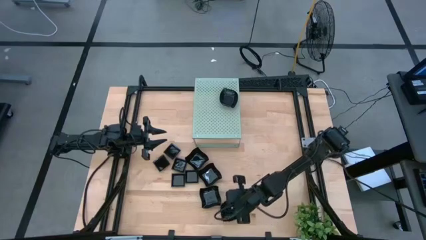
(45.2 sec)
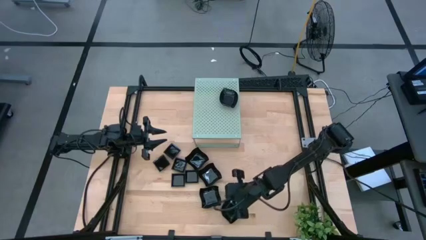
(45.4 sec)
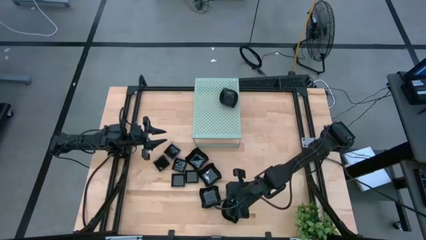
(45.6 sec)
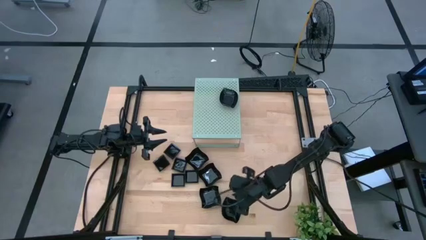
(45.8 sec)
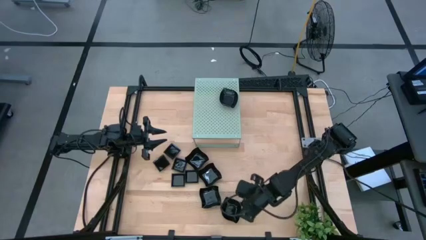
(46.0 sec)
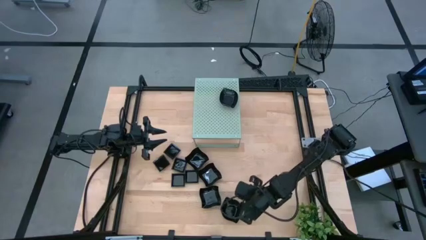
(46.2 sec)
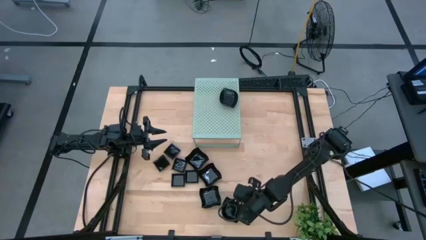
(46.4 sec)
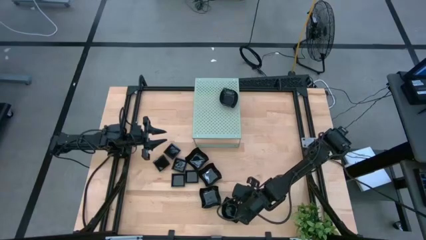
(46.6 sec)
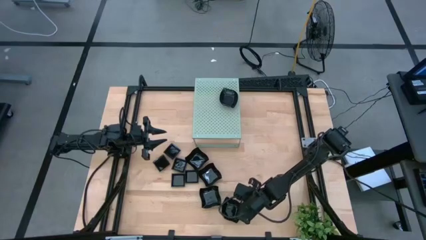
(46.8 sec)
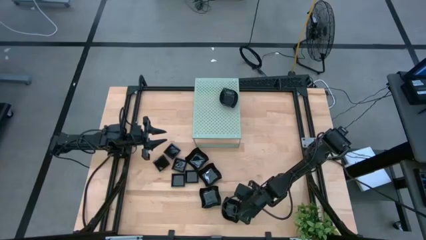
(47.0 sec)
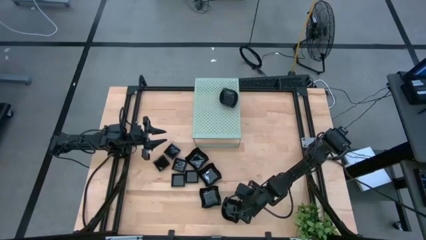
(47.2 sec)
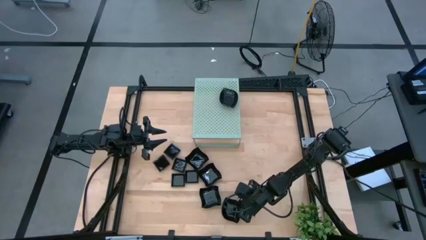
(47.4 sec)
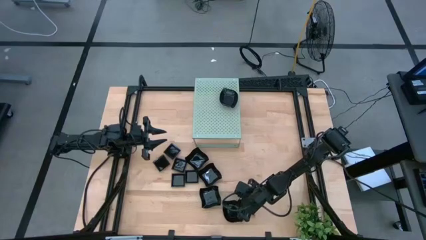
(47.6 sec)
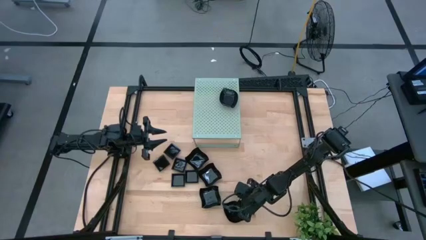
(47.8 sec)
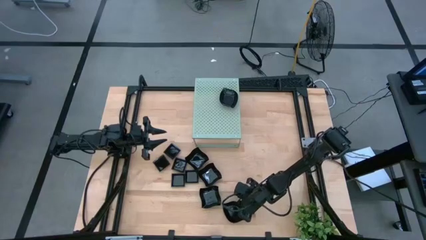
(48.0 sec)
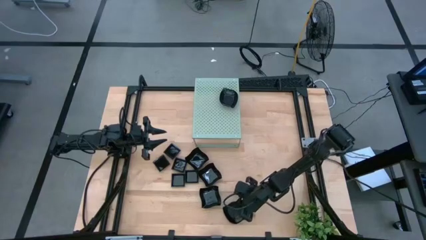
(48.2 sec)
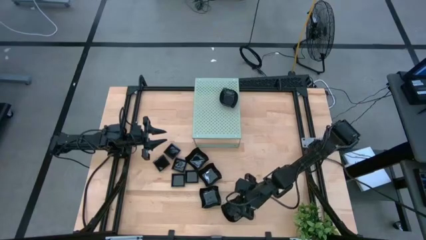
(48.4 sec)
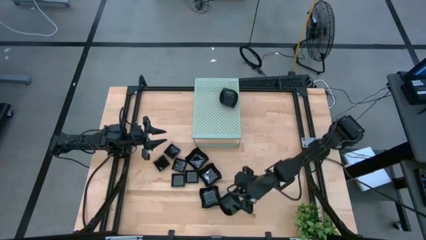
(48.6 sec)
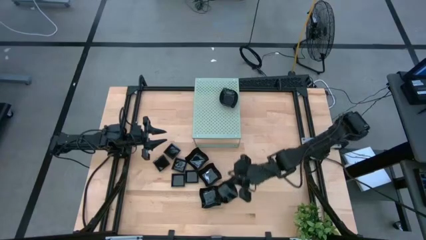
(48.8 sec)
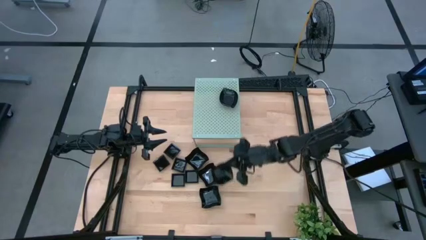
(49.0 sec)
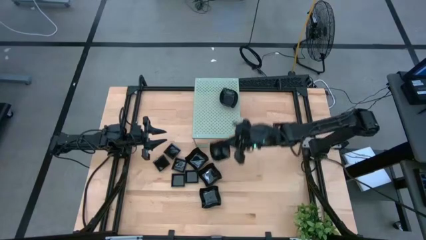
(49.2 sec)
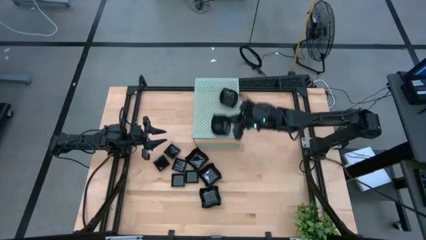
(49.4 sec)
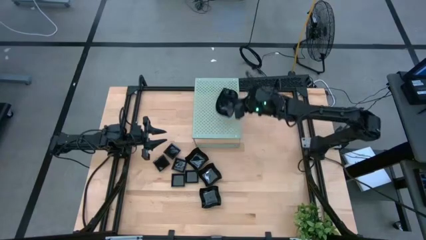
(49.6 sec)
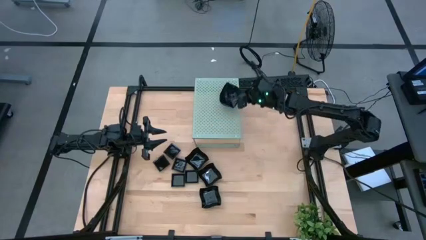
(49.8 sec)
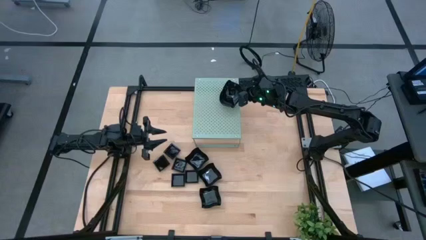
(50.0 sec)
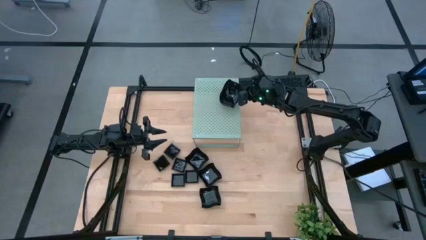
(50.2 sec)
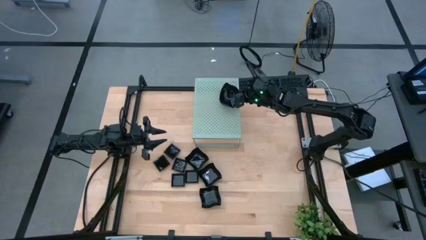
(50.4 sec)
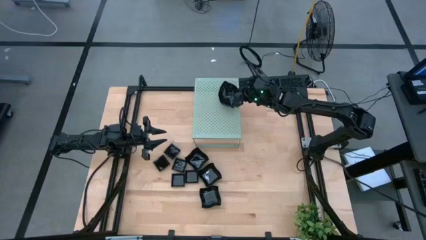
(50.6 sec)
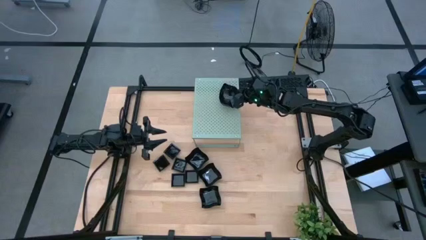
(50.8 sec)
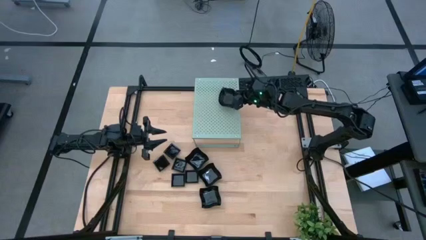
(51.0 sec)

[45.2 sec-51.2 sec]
Task: Pick & Place Mini shaped plates
Stack the black leaf-shaped plate on top of the other leaf-shaped plates on the shelf

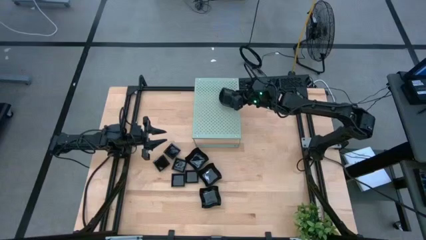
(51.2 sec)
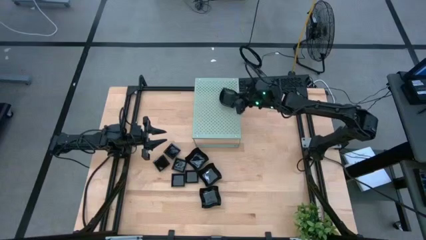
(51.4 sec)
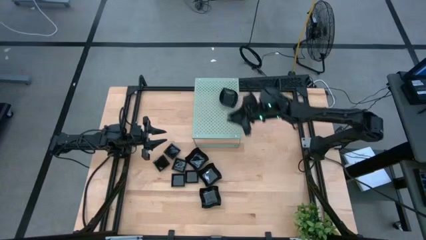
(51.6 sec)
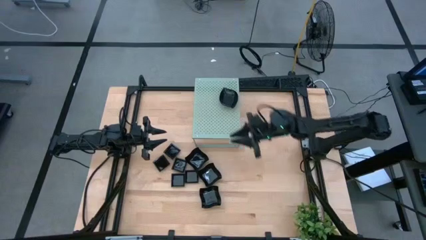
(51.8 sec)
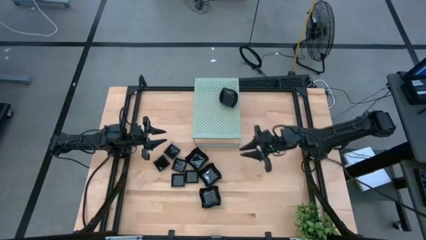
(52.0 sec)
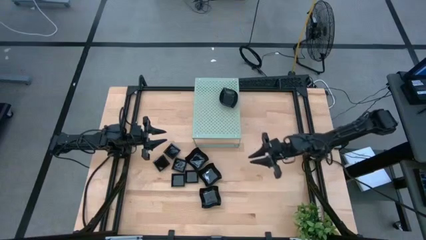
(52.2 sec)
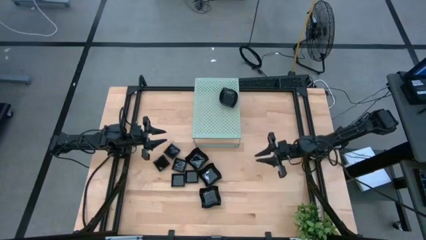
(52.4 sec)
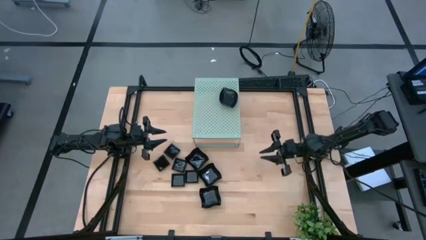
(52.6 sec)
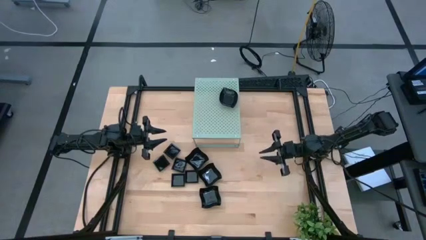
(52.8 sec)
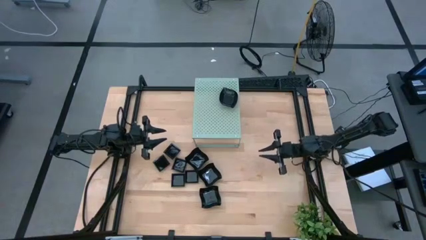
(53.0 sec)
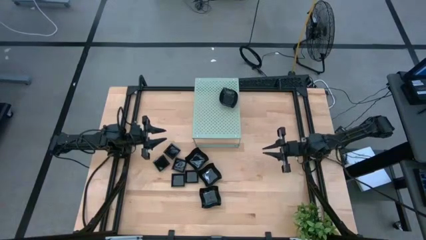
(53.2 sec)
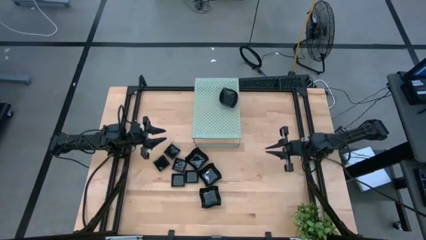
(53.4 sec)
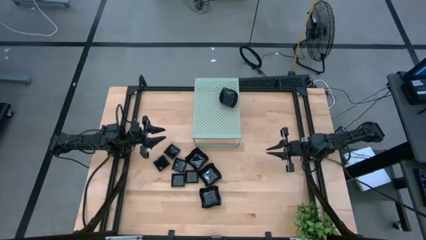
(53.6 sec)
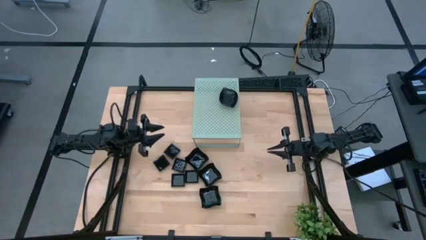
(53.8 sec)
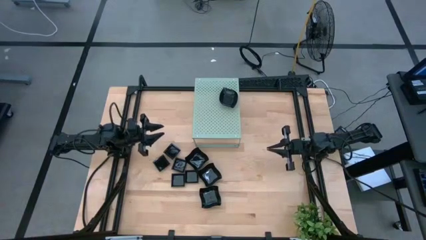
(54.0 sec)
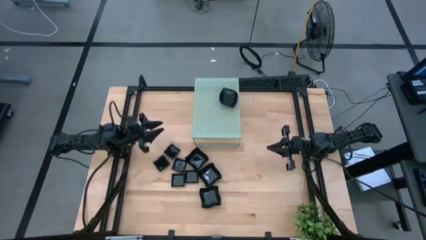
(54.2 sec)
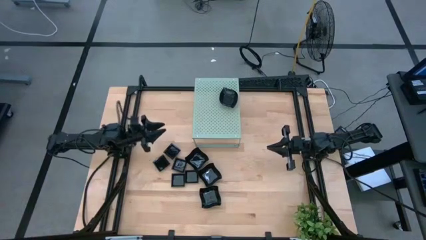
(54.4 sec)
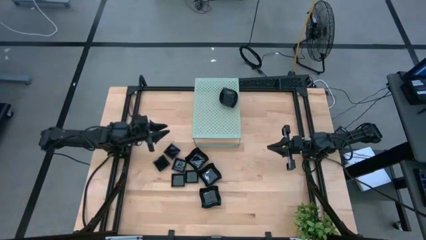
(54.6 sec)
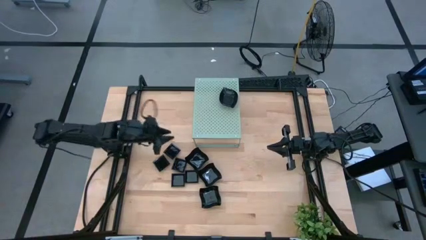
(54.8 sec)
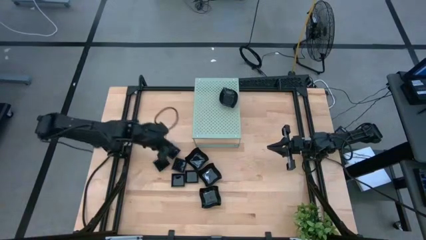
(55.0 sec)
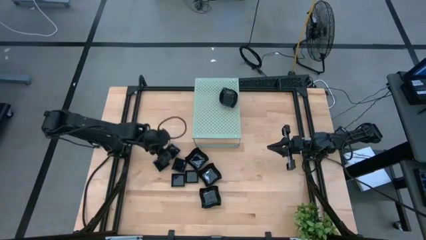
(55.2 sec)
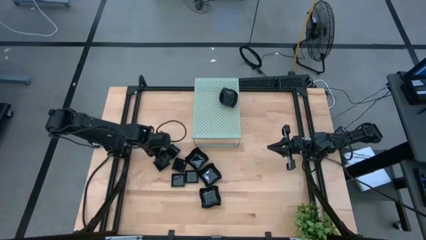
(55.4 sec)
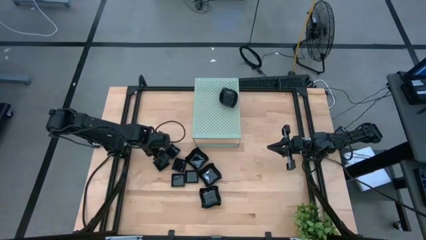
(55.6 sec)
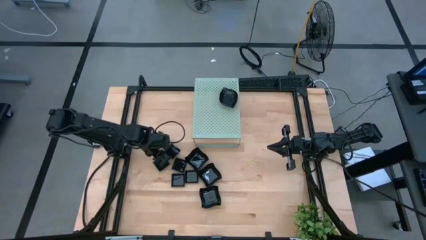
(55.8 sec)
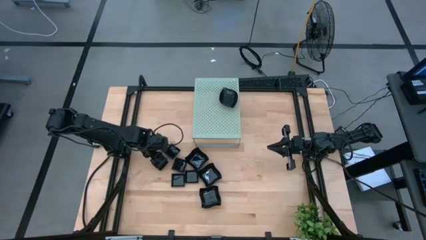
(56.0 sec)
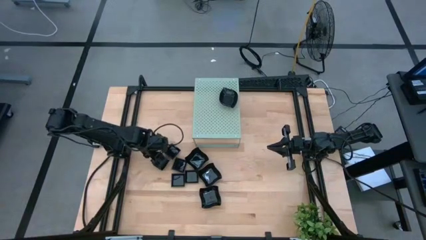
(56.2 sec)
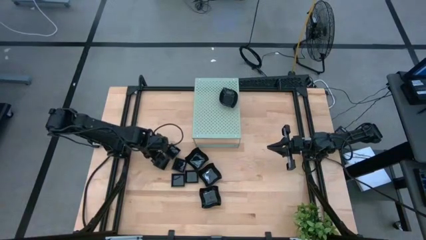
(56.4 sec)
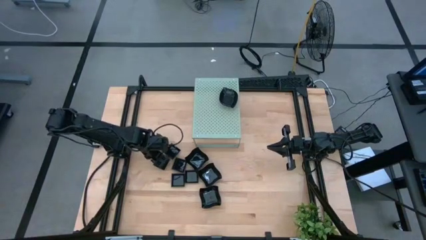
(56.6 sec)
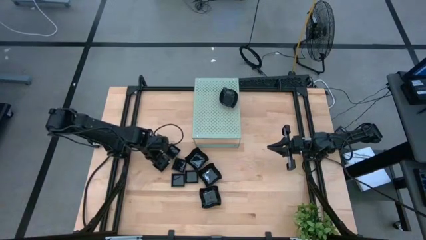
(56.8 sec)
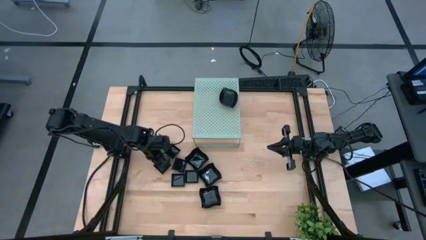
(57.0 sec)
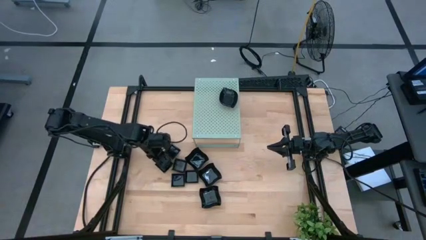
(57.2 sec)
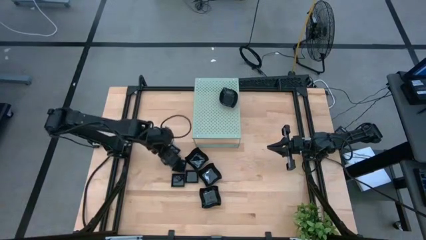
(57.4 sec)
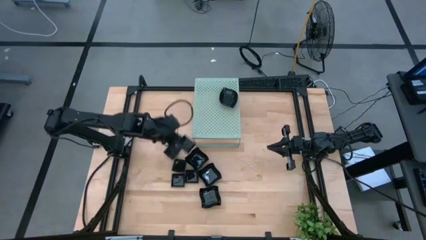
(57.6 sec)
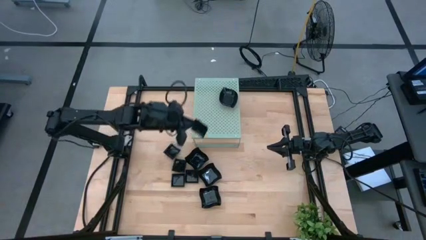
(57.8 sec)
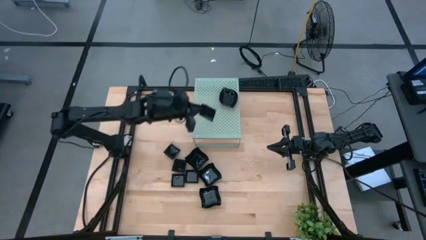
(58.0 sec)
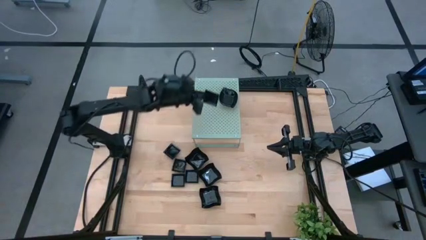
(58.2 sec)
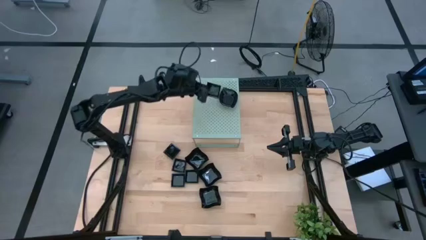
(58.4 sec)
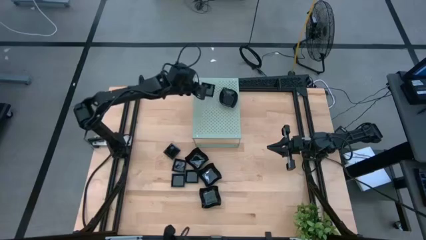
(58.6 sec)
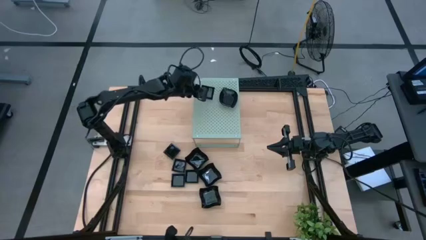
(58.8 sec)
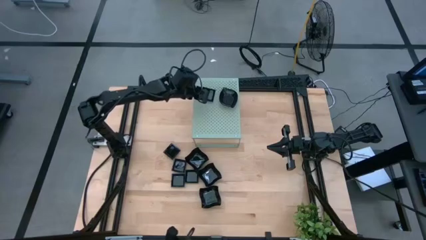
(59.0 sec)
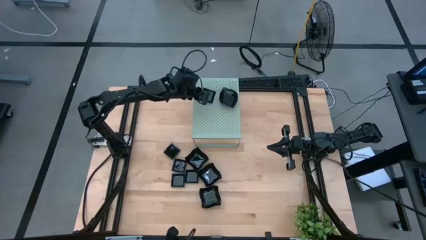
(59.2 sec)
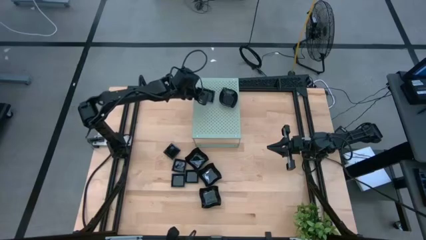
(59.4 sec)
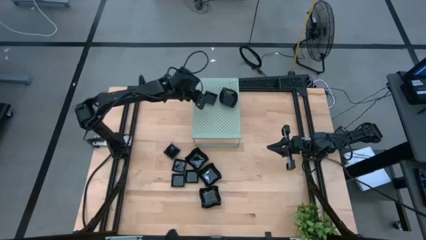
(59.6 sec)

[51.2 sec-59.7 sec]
Put the black square plate on the shelf

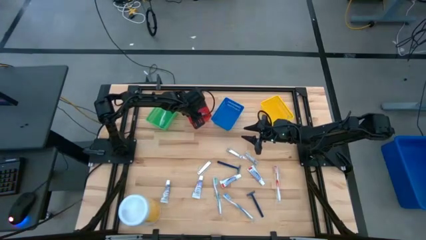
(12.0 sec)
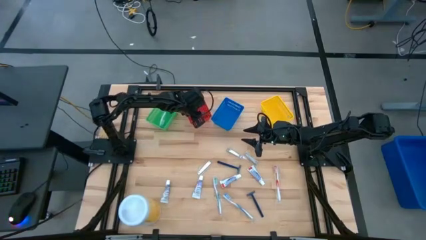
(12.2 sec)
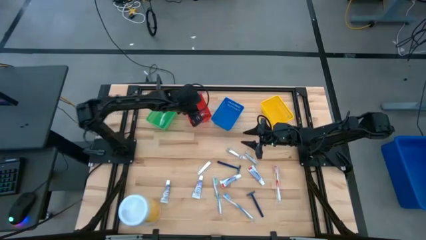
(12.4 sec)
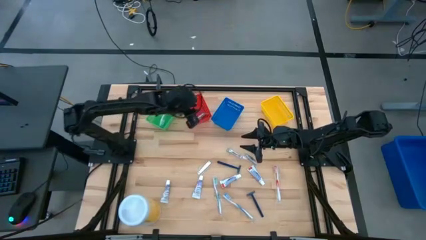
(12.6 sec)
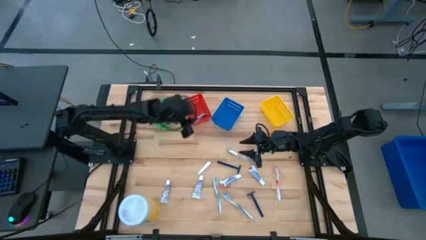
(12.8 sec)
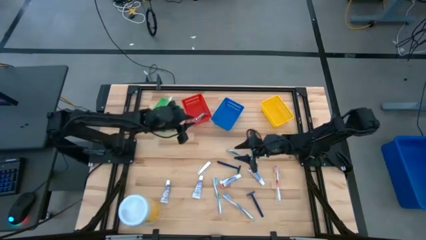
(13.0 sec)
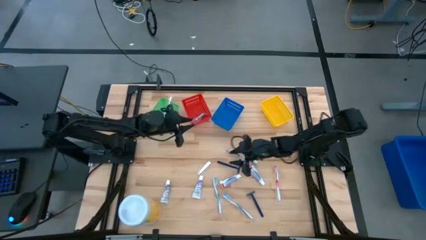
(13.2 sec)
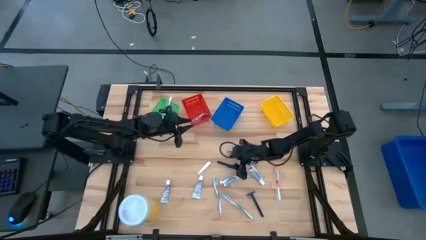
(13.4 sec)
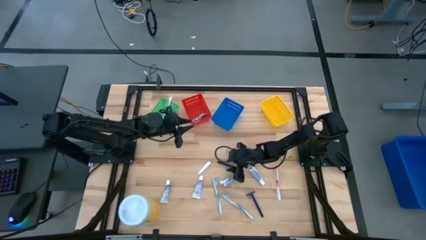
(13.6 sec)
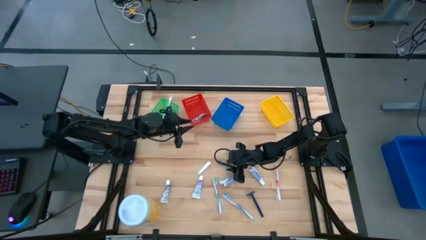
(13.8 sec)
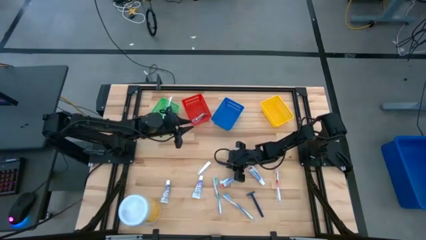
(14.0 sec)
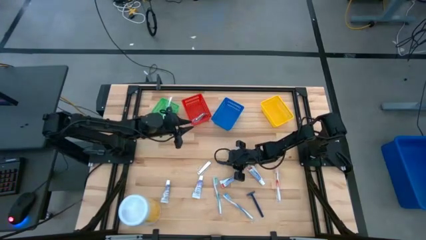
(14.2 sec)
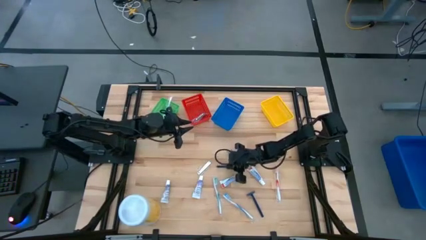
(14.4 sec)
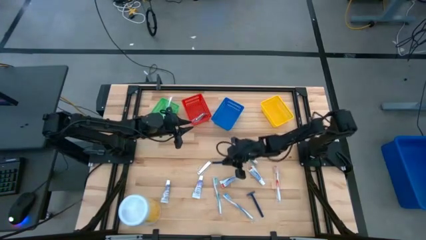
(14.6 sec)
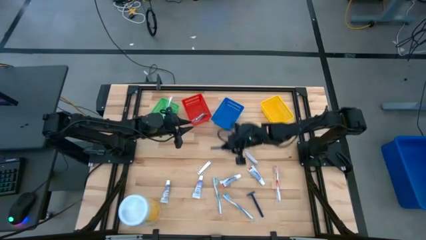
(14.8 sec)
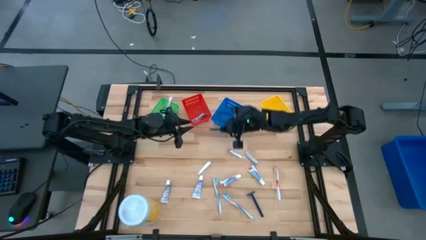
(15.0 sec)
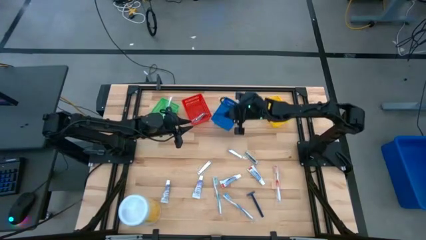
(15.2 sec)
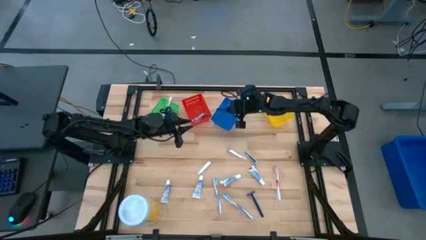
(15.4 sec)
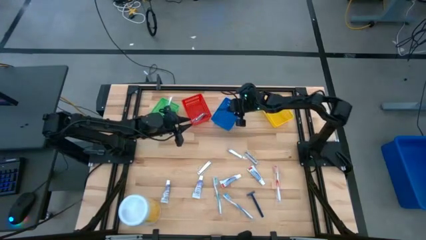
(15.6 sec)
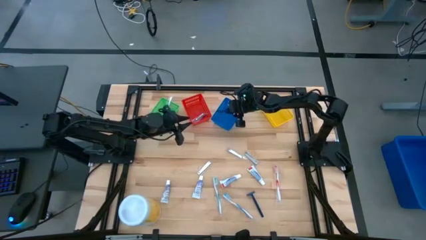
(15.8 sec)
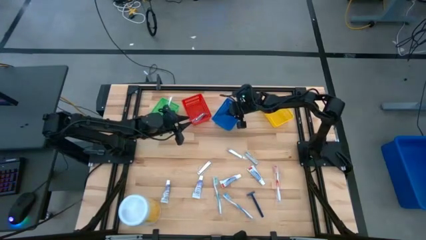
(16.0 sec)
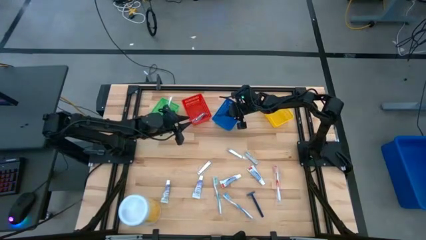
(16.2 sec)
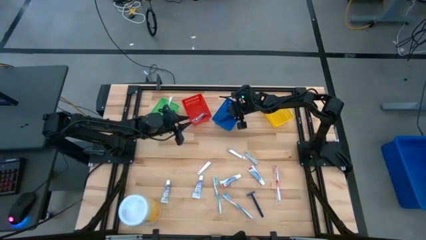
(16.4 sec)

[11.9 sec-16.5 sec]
Task: Pick & Place Travel size toiletries
Put the top razor into the blue basket
